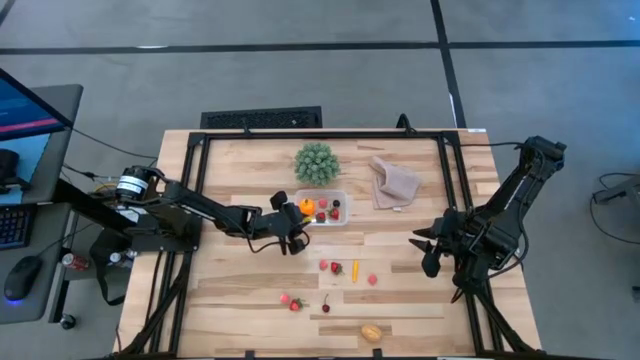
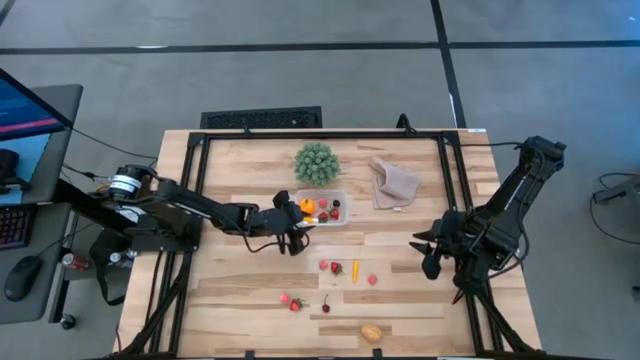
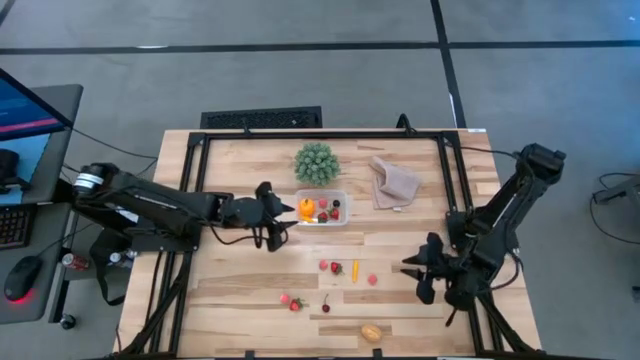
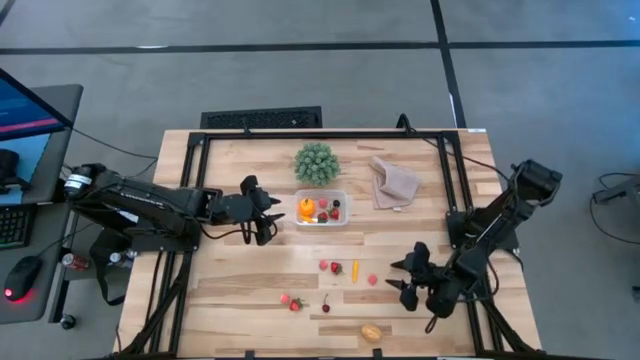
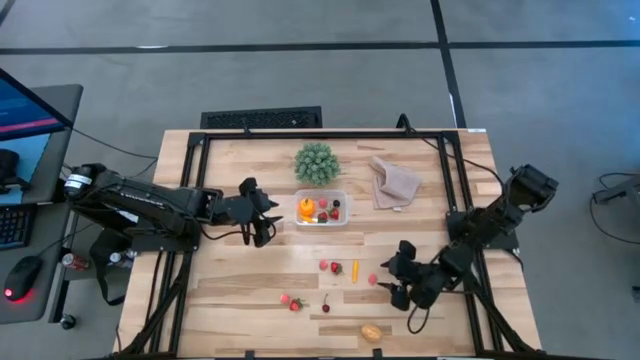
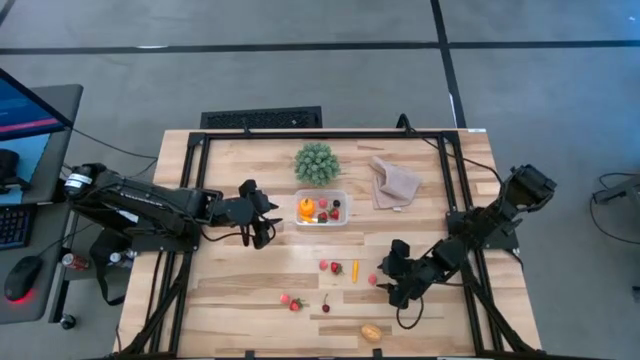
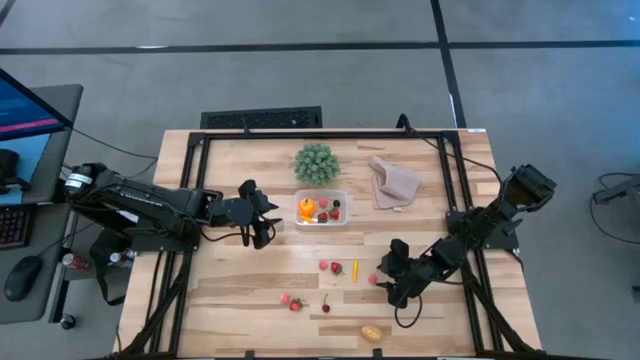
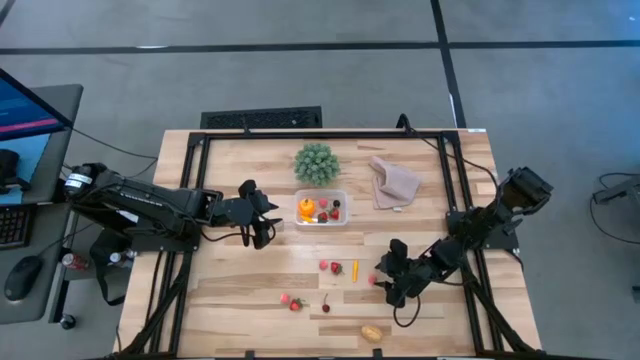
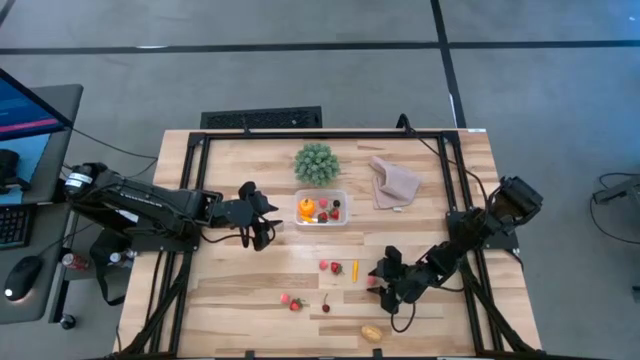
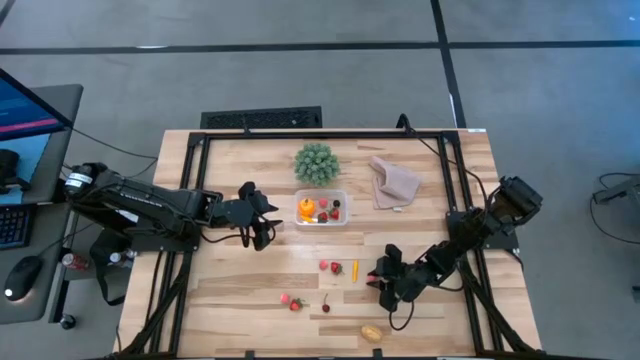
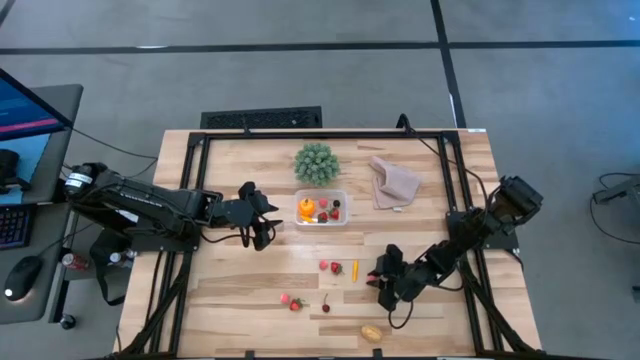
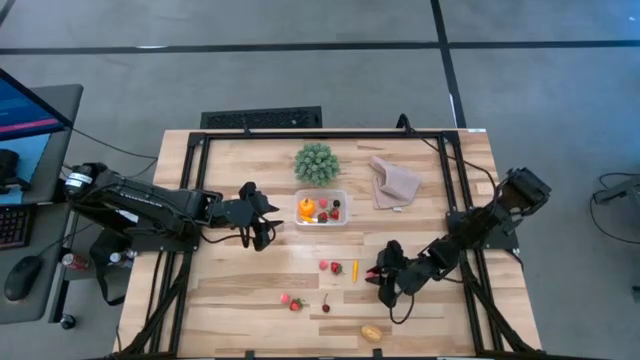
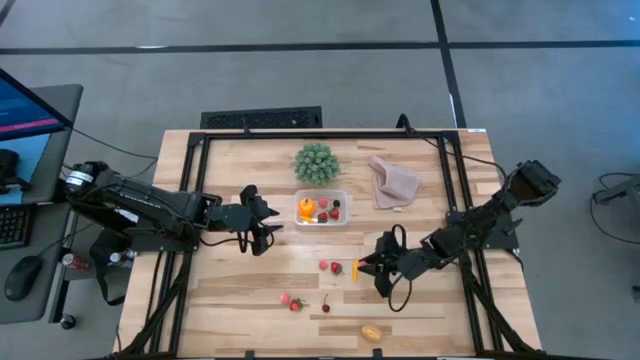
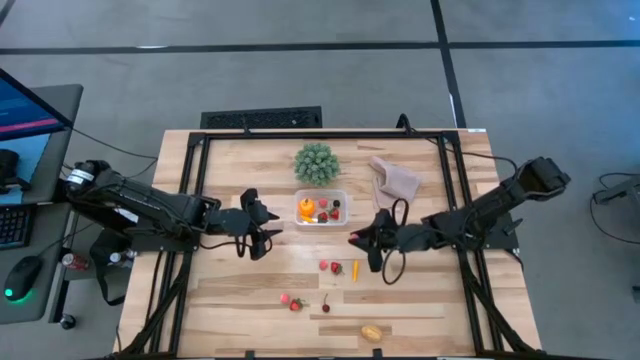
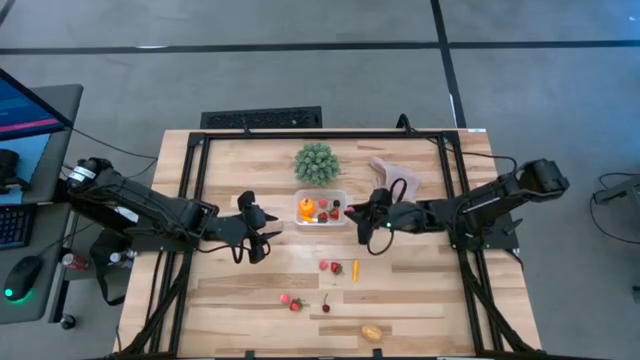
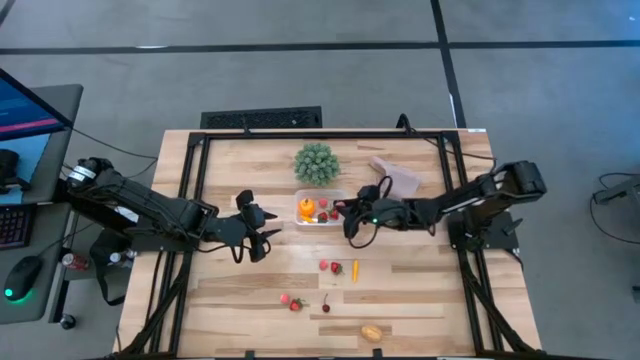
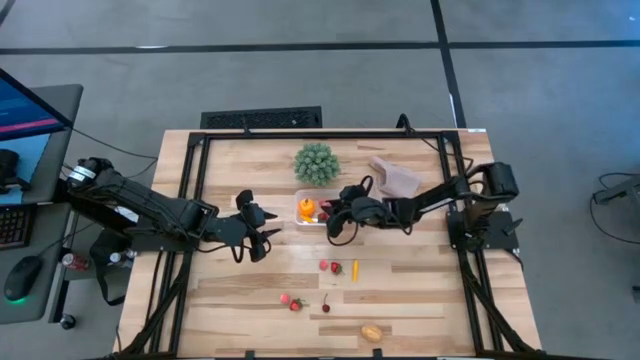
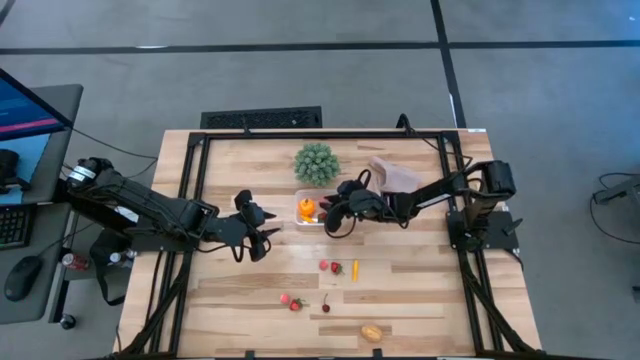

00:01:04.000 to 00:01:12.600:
Task: Pick and placing Produce into tupperware
Put the pink peach into the transparent container

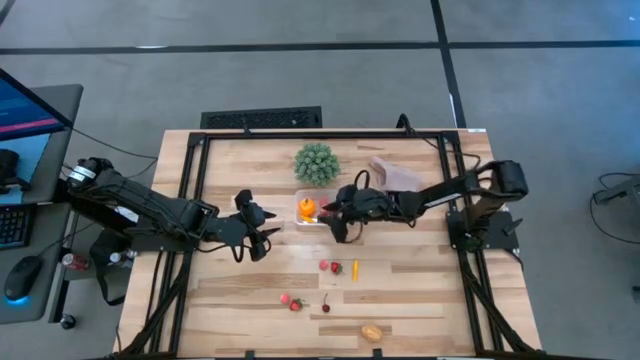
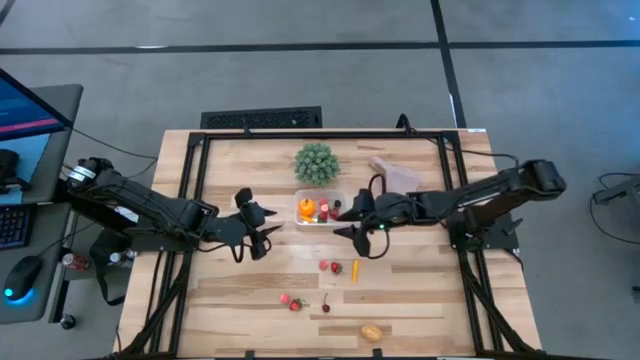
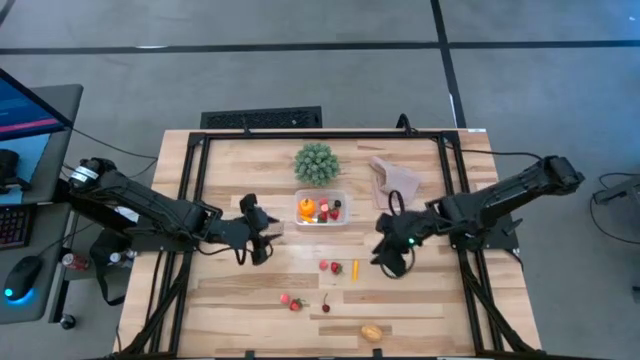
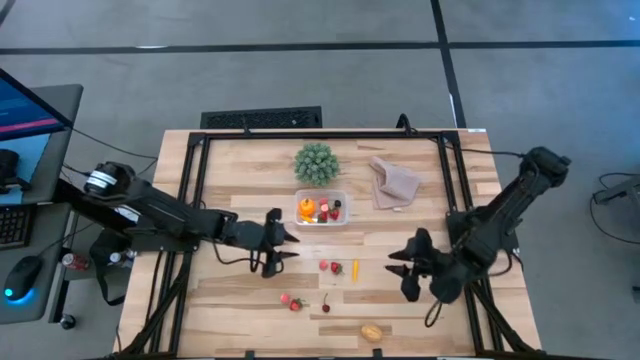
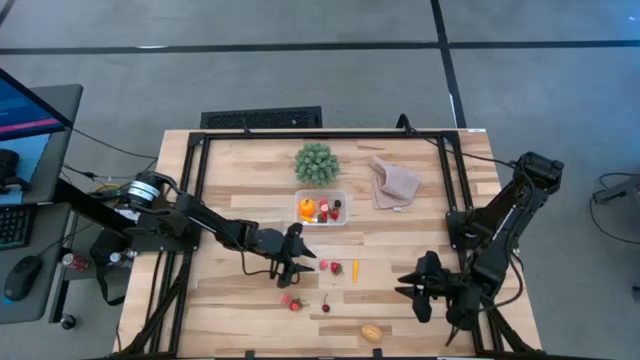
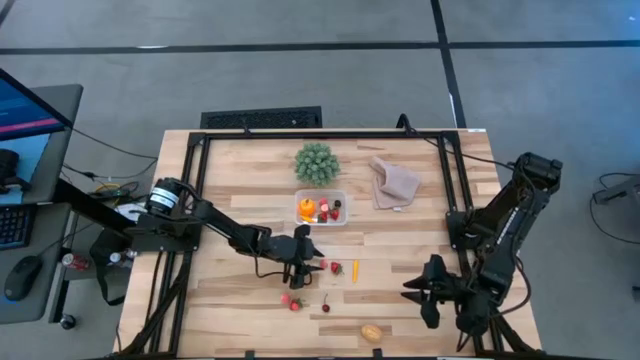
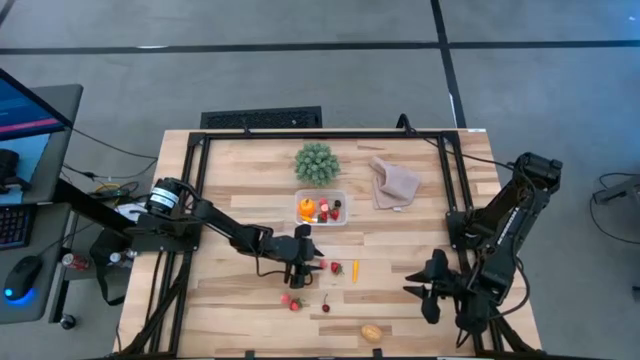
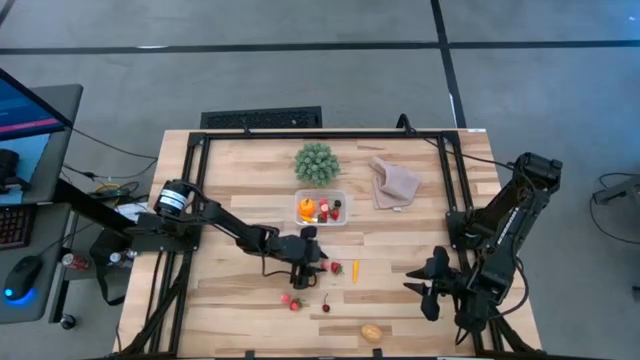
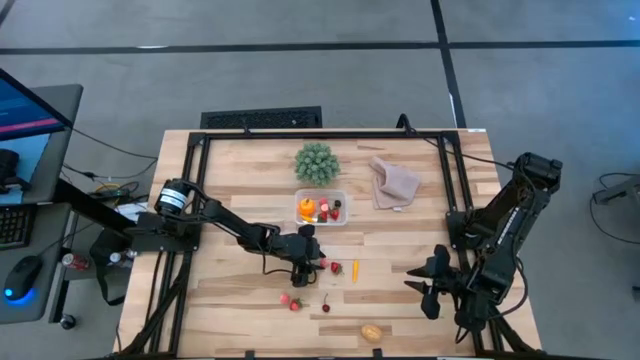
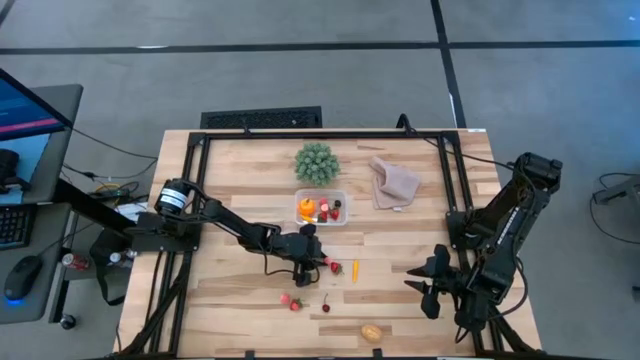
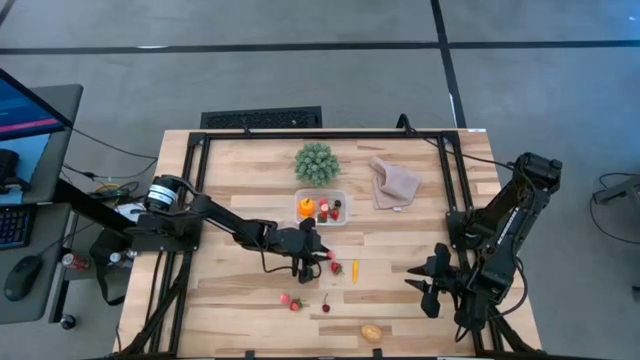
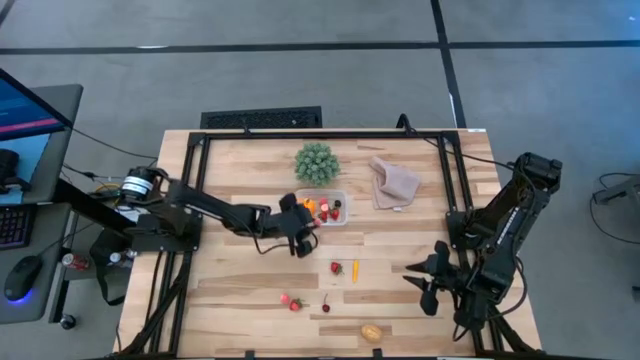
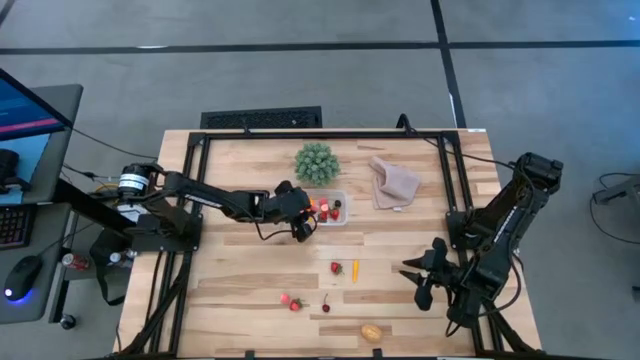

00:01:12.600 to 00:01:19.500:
Put the pink peach into the transparent container

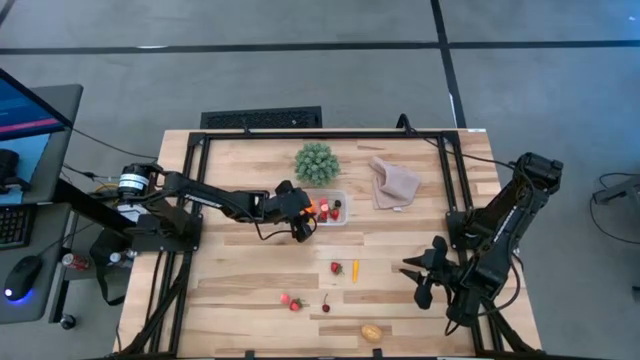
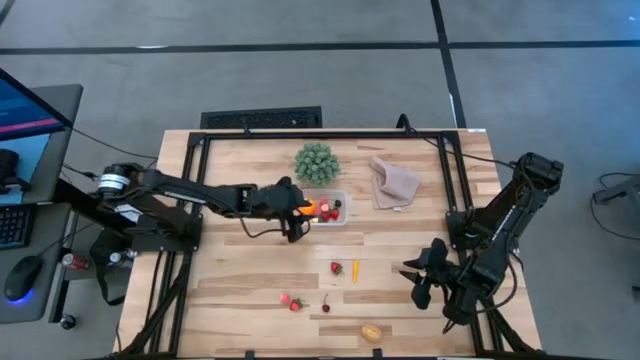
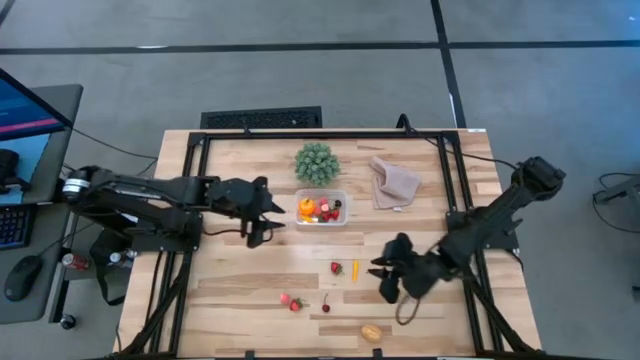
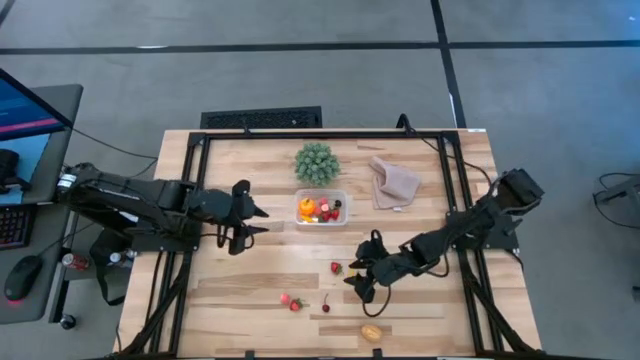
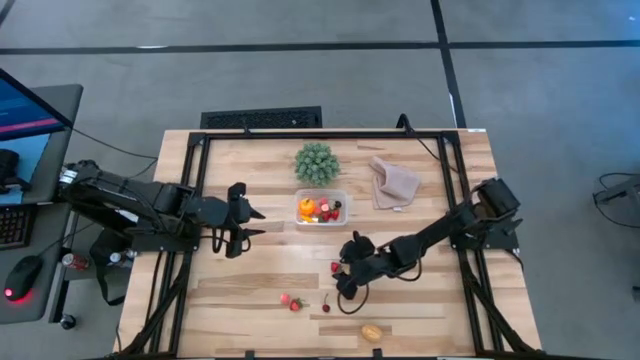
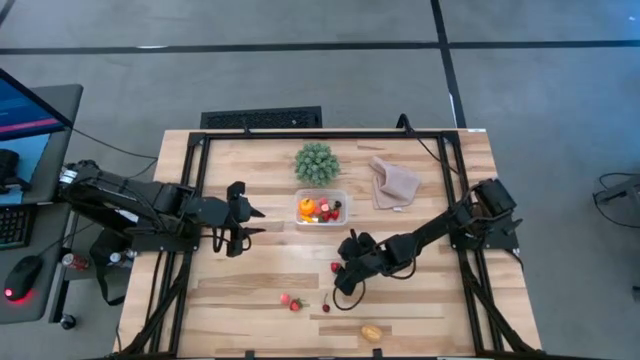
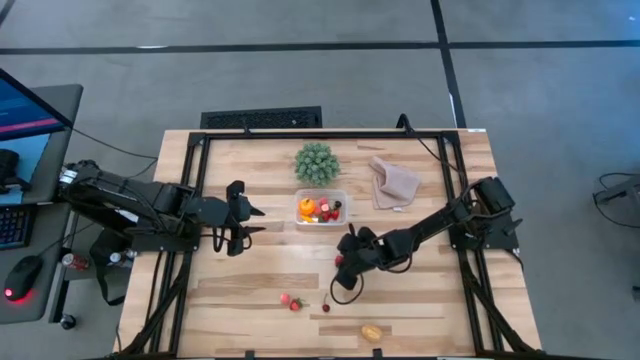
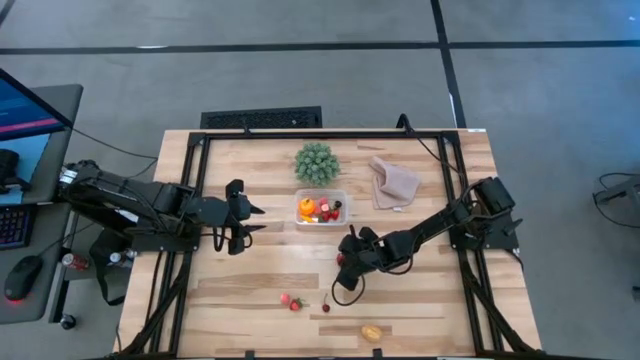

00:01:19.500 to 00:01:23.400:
Put the red strawberry into the transparent container

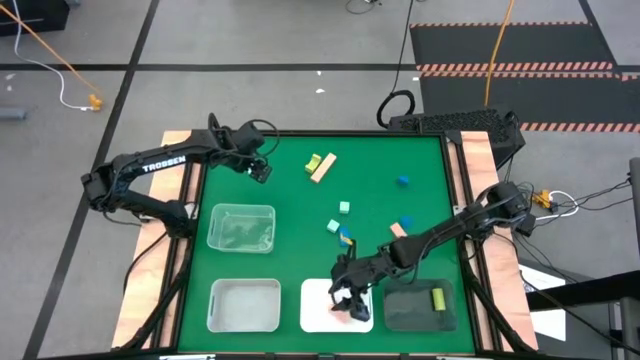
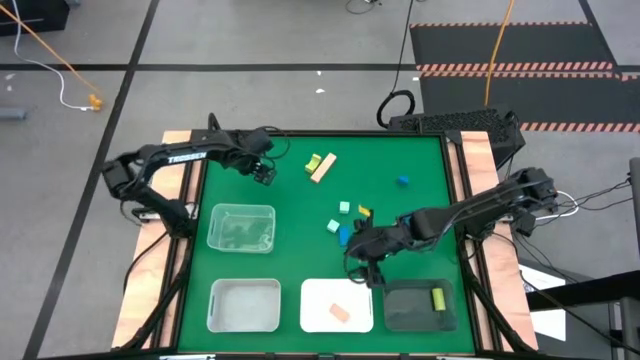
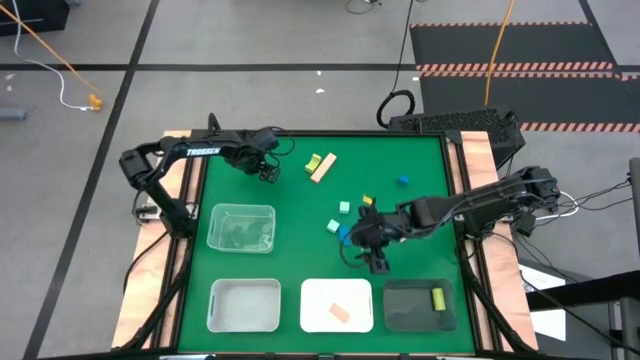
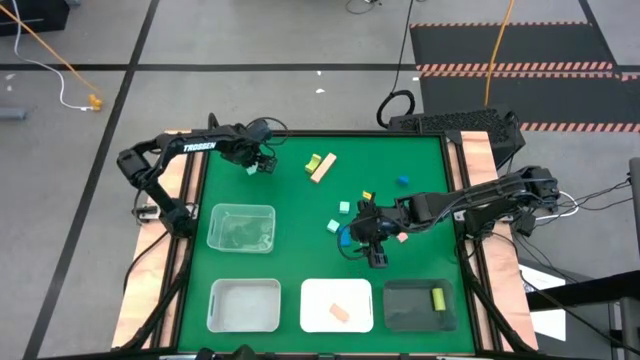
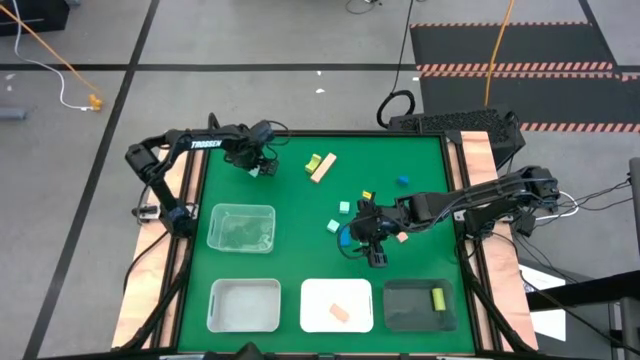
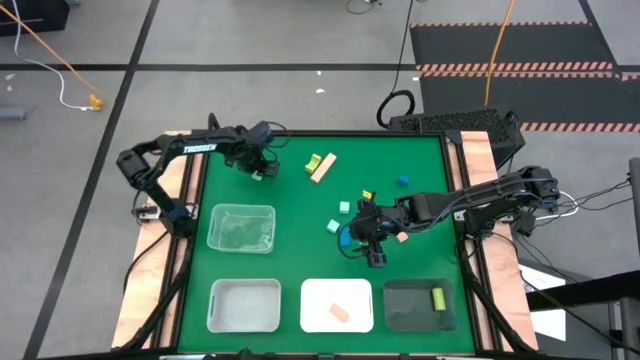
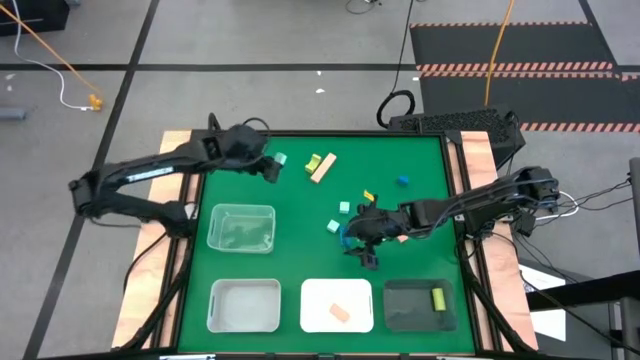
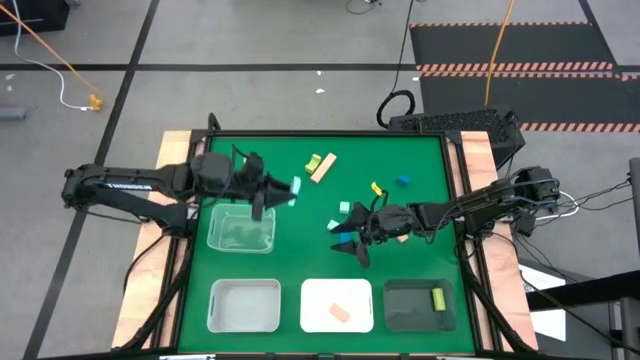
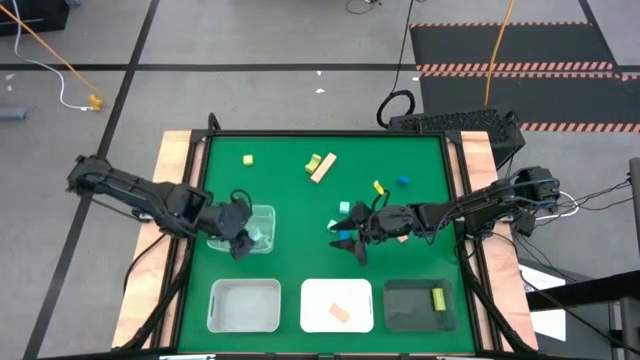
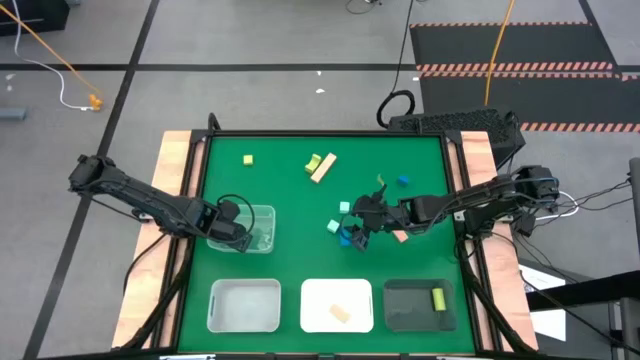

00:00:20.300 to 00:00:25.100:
Task: Sort & place blocks by color
Put the top left light blue block into the transparent bin
